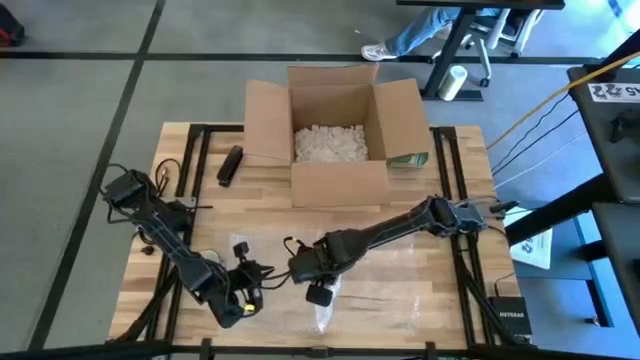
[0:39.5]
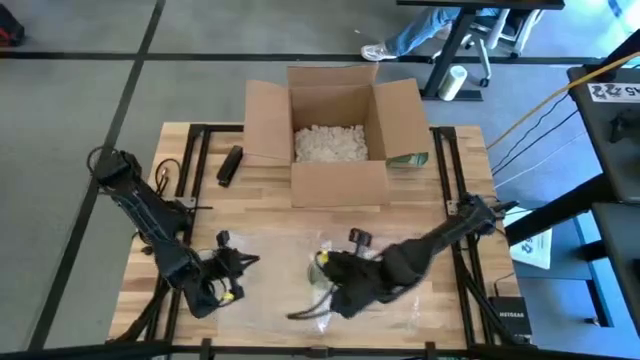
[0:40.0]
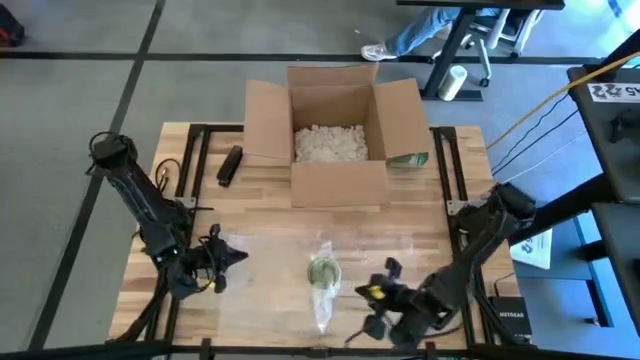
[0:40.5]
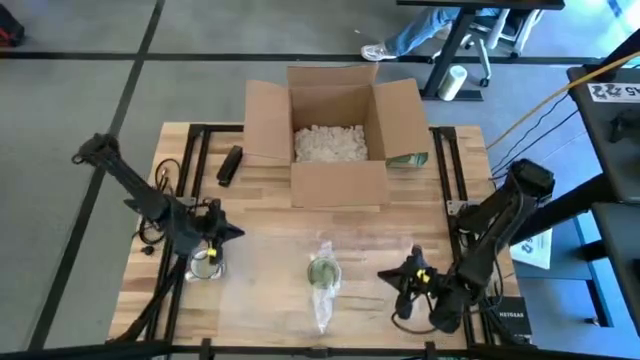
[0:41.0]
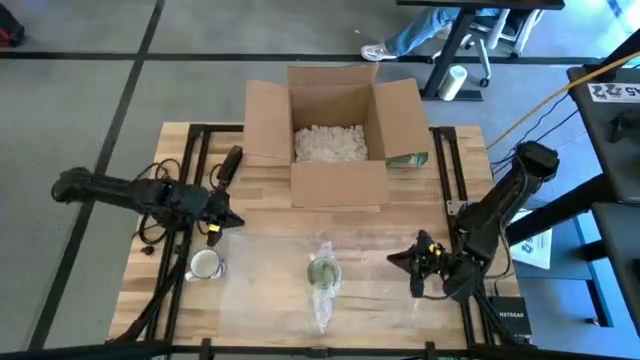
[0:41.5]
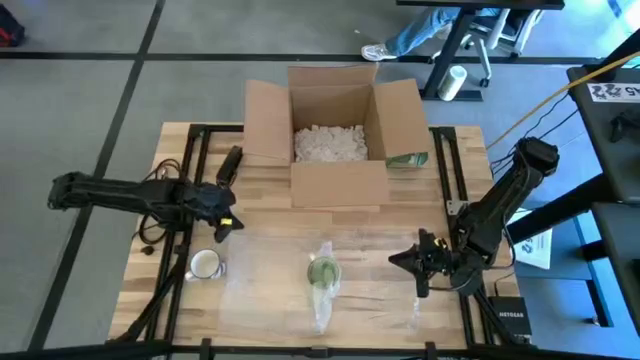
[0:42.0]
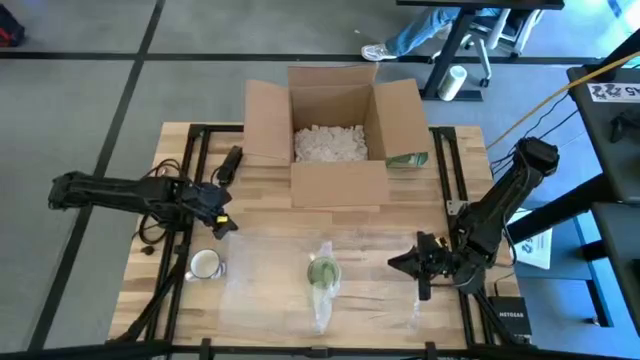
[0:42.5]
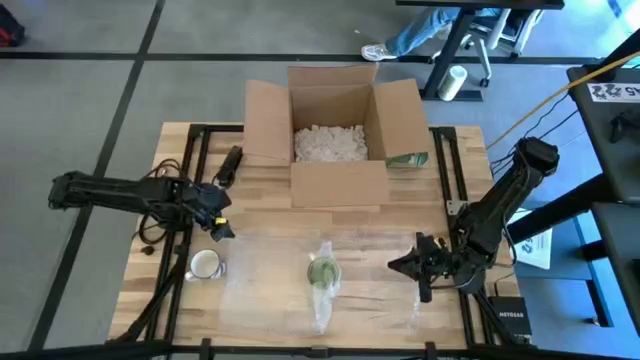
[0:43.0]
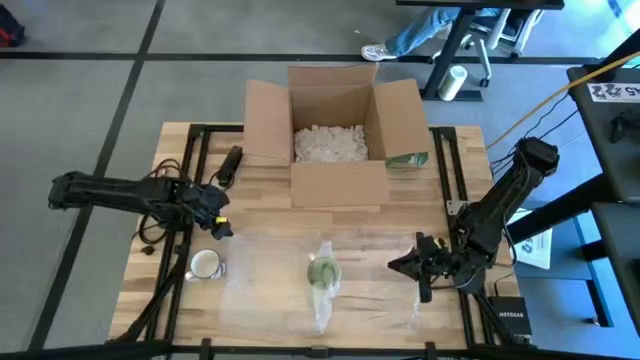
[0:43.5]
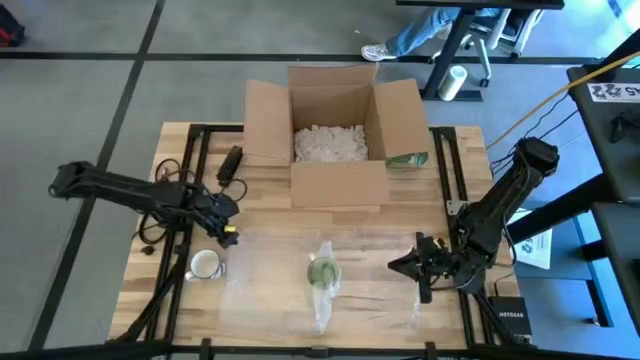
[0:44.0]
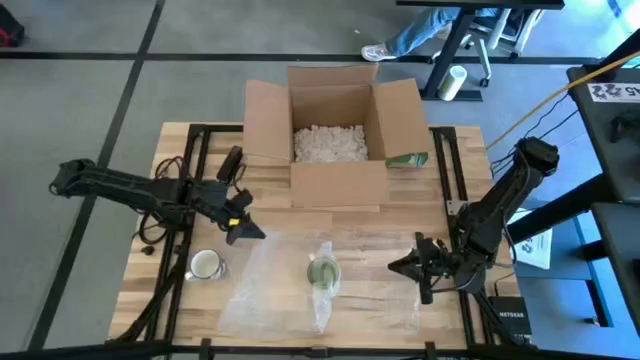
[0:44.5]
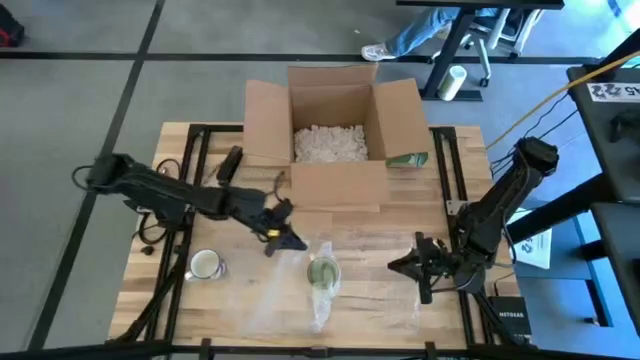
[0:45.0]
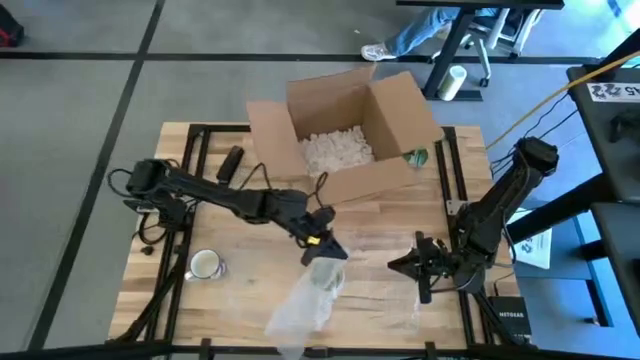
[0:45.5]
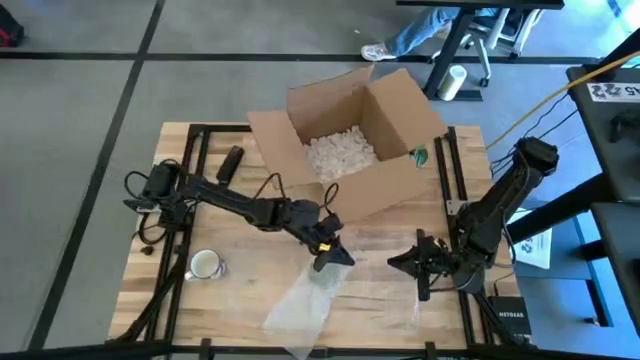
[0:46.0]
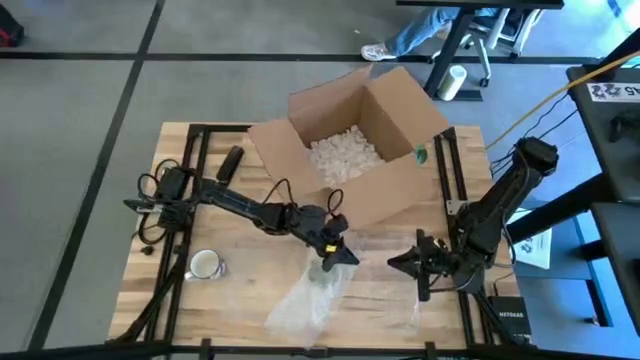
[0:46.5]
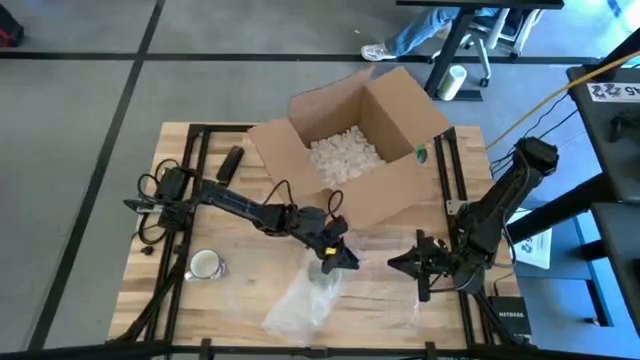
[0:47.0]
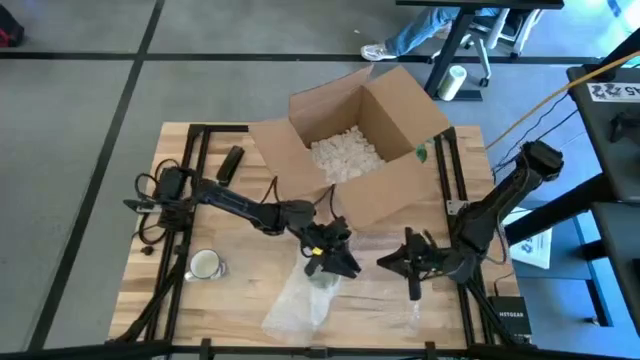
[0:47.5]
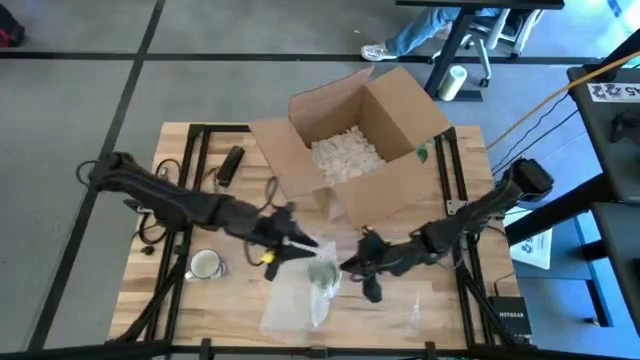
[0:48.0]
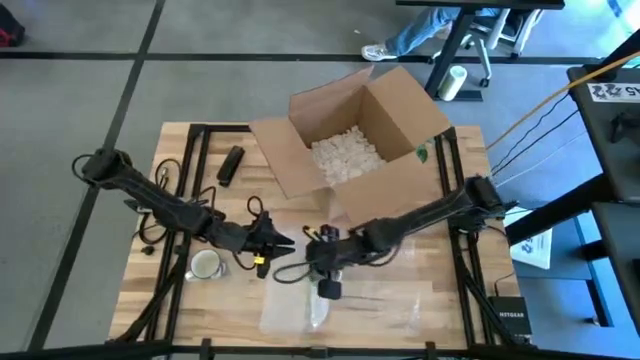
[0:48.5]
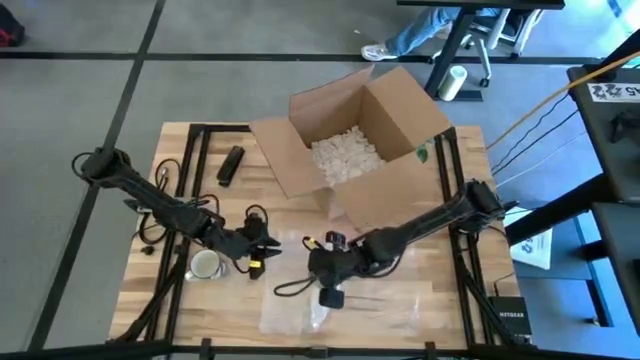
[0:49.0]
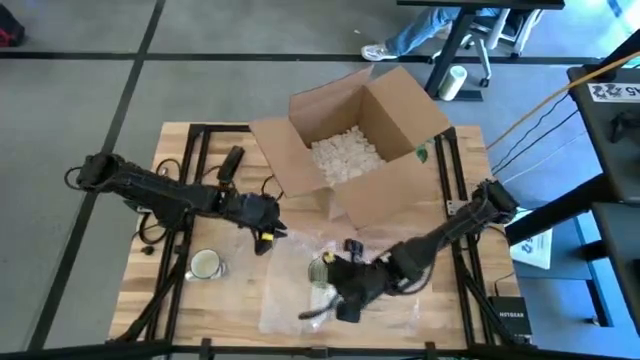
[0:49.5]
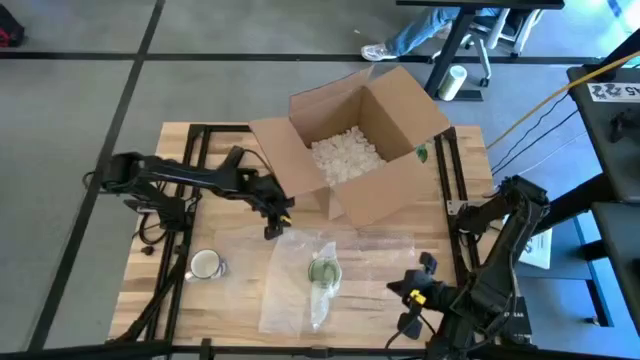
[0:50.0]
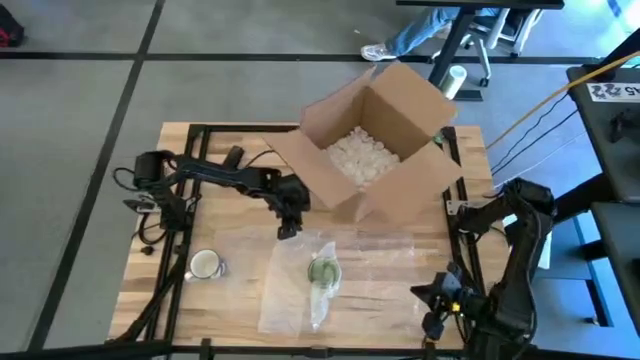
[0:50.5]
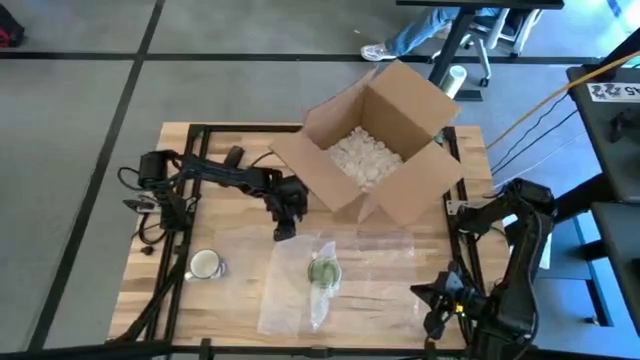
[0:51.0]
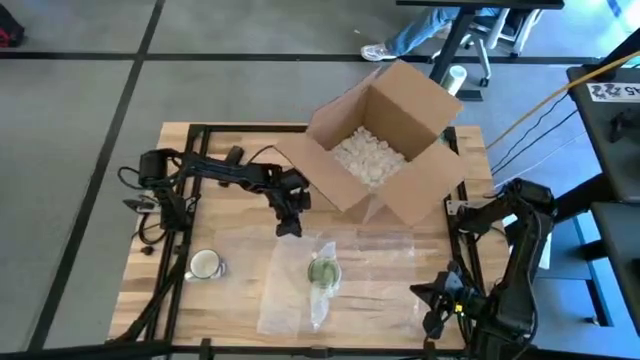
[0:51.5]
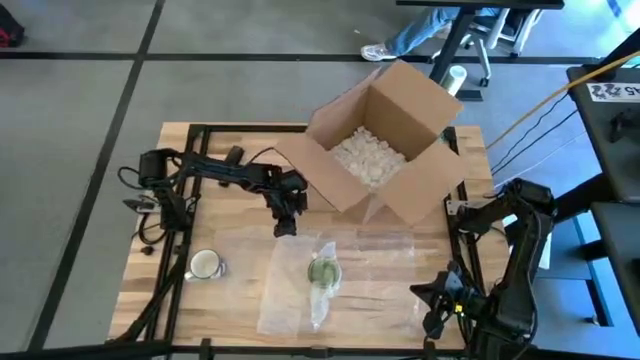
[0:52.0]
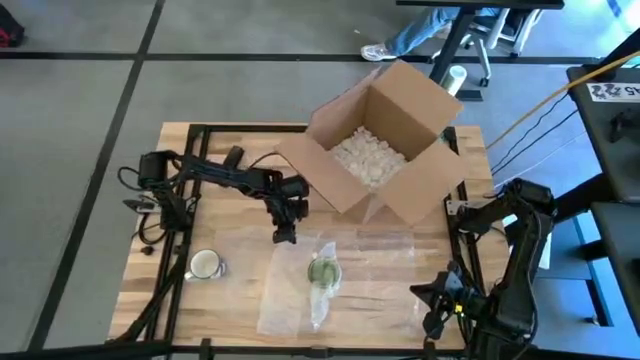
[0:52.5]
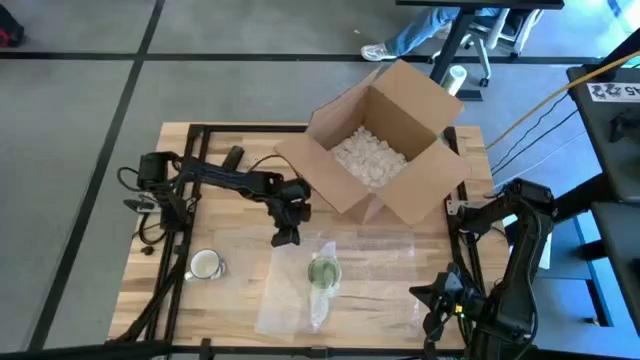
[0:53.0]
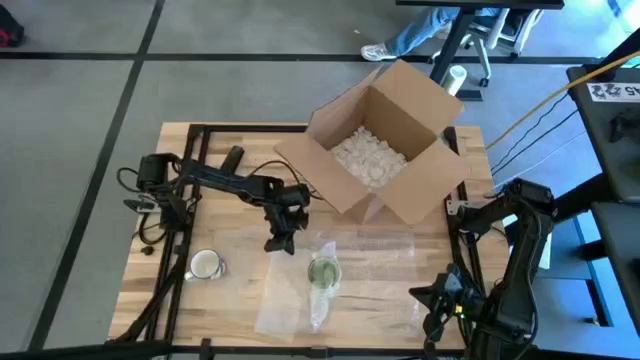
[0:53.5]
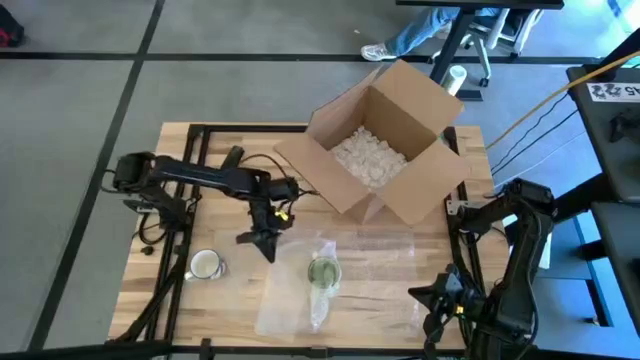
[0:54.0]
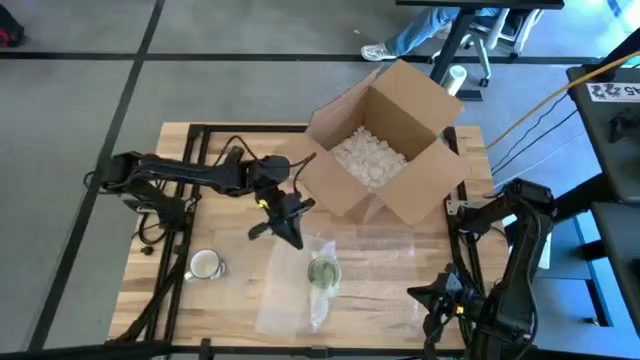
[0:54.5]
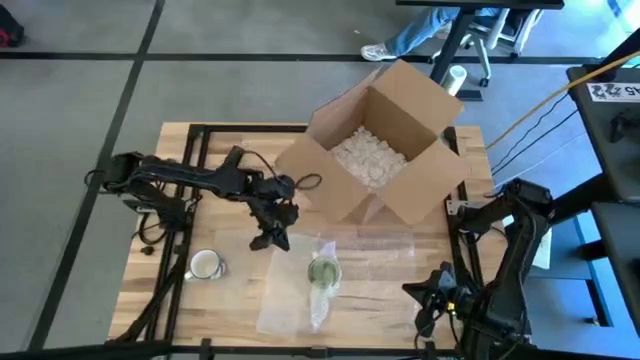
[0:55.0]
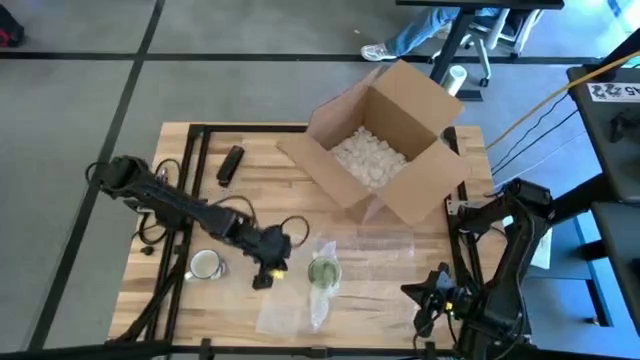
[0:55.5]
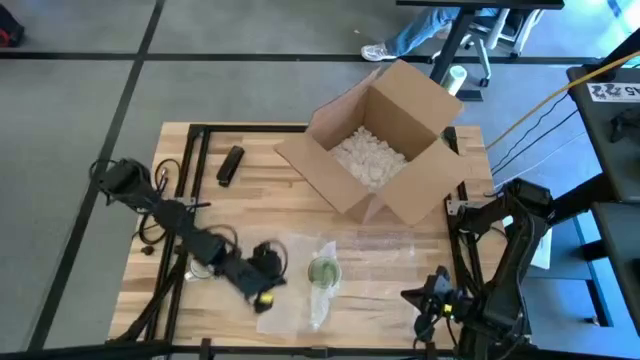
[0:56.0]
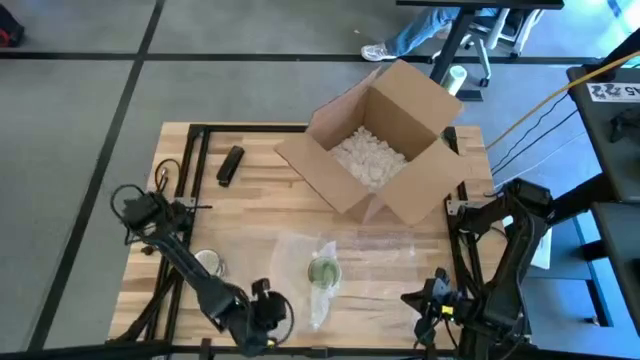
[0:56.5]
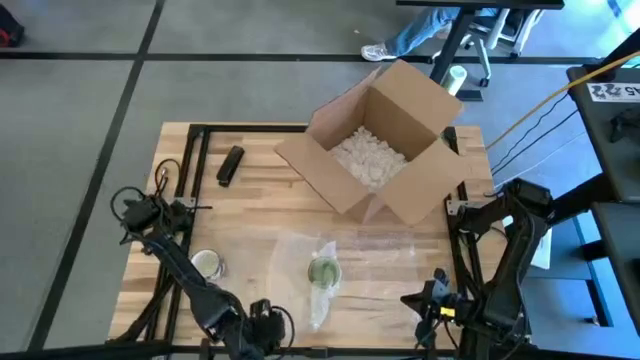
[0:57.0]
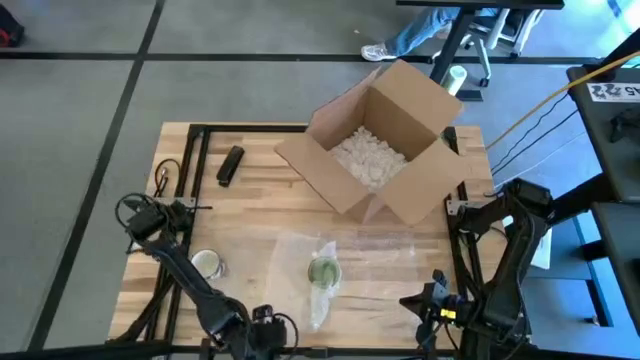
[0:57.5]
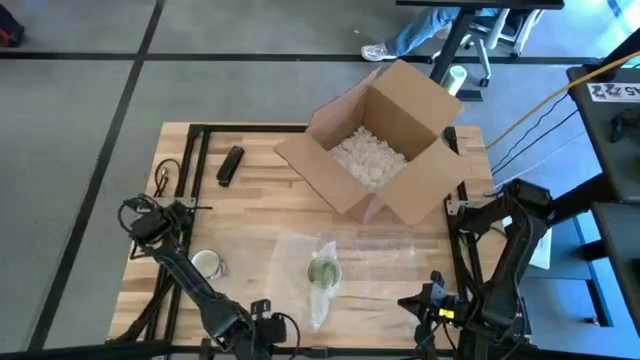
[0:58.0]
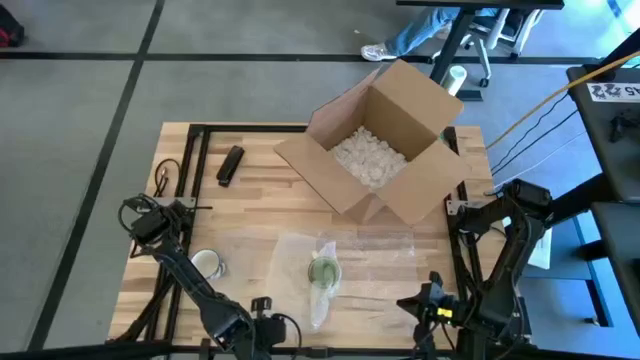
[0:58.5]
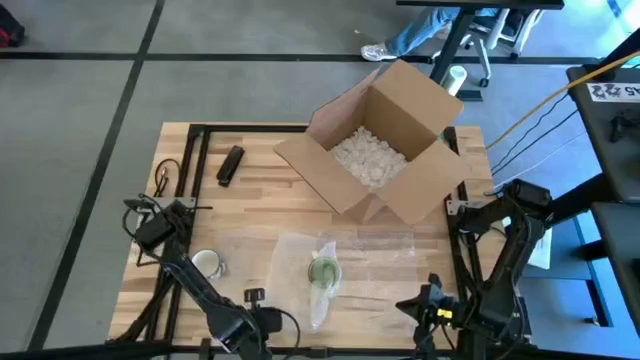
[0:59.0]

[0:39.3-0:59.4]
Task: wrap mug
Wrap the green mug with bubble wrap

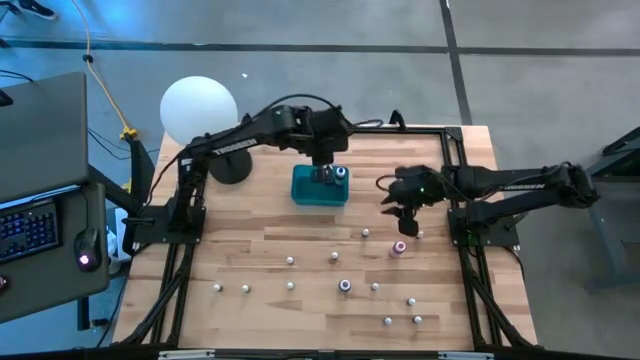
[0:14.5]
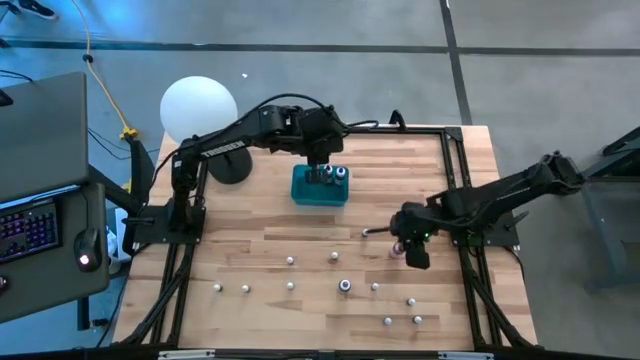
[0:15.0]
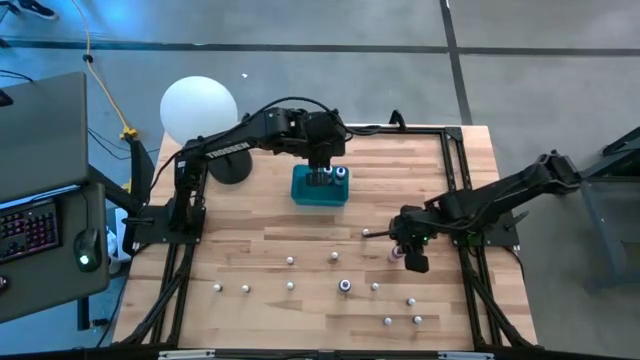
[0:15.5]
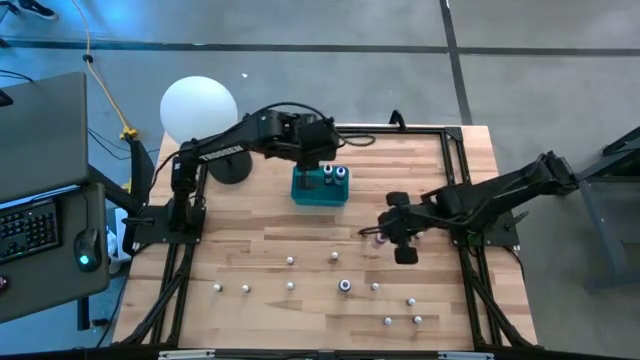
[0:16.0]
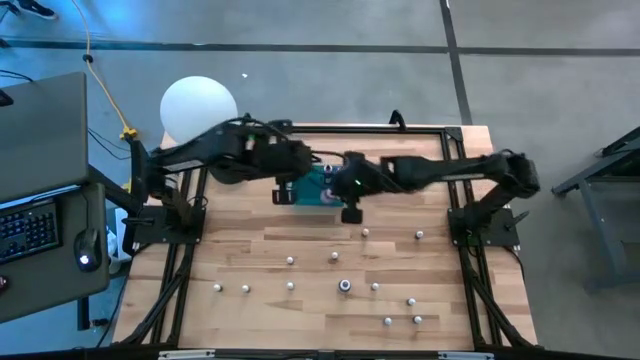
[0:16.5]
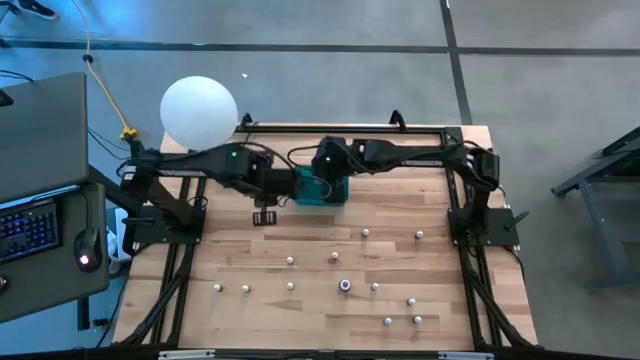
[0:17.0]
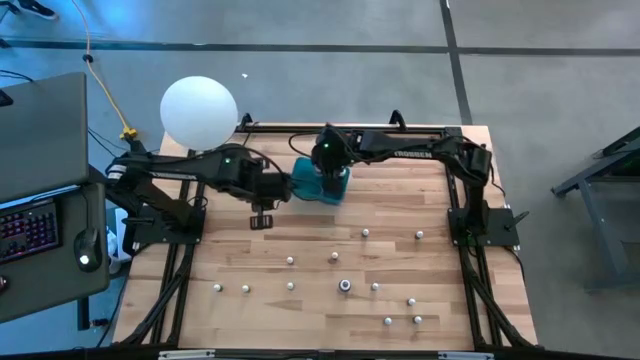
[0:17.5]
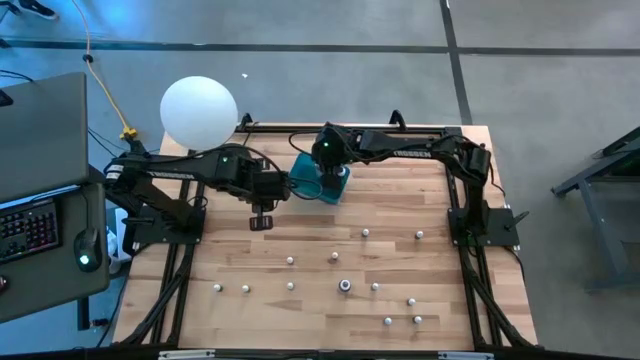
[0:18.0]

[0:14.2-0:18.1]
Task: Pick & Place food coloring
Put the big pink food coloring bottle into the blue bin
